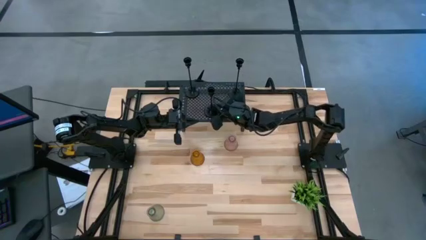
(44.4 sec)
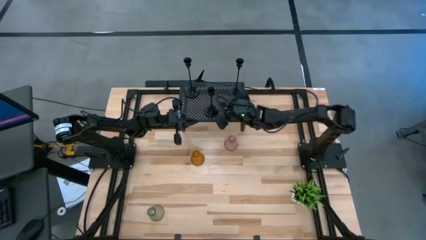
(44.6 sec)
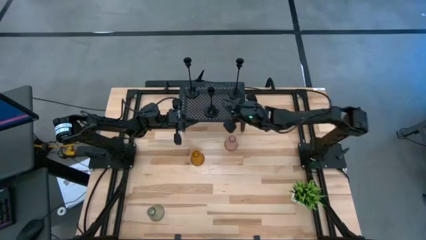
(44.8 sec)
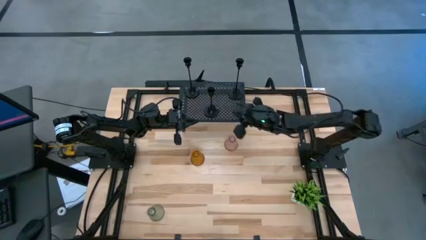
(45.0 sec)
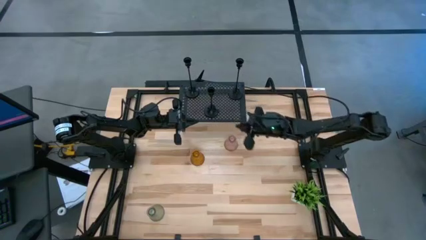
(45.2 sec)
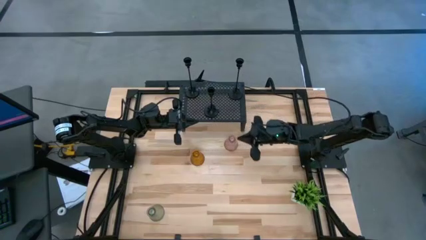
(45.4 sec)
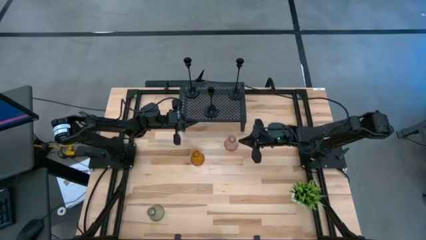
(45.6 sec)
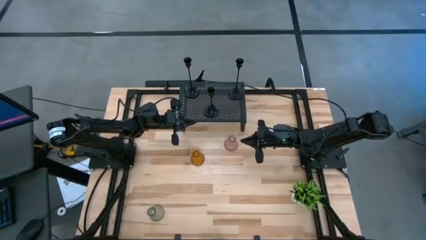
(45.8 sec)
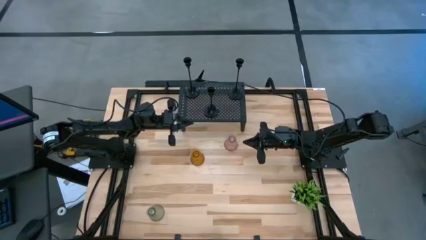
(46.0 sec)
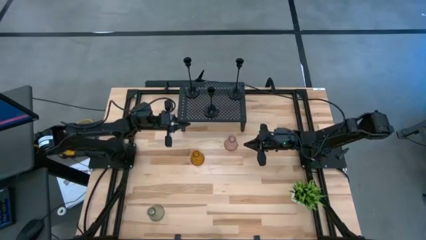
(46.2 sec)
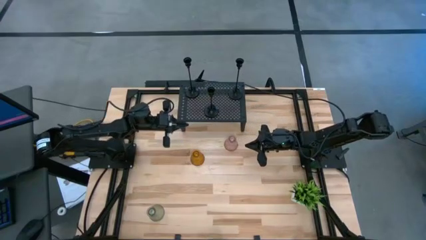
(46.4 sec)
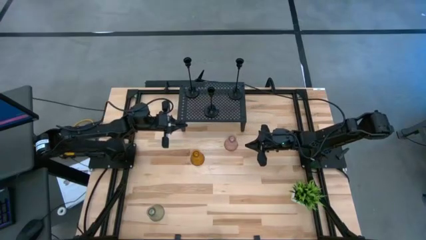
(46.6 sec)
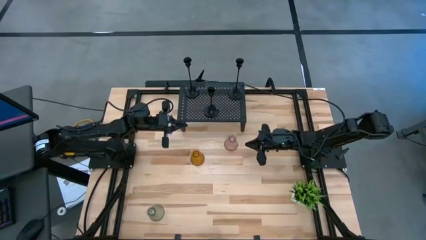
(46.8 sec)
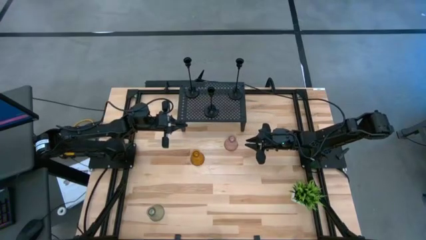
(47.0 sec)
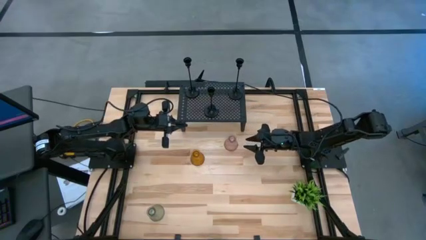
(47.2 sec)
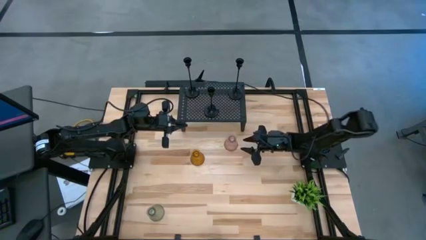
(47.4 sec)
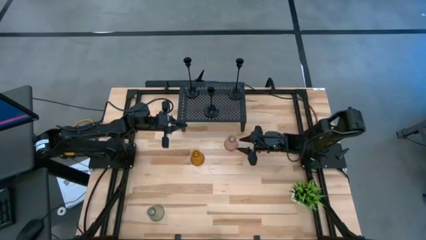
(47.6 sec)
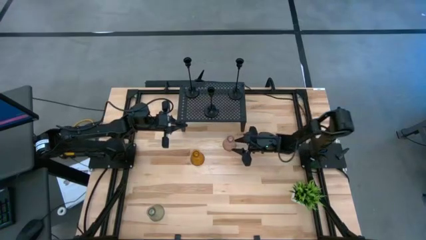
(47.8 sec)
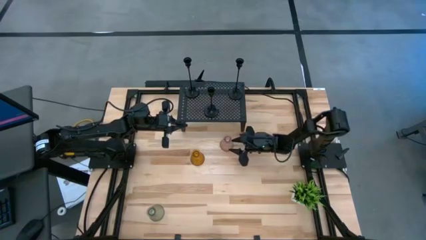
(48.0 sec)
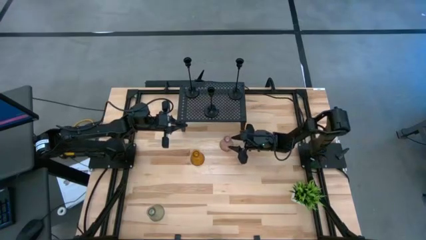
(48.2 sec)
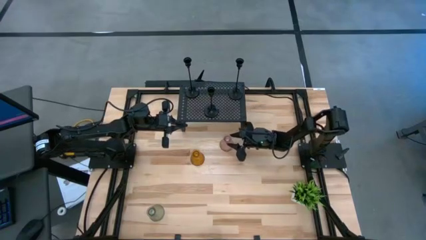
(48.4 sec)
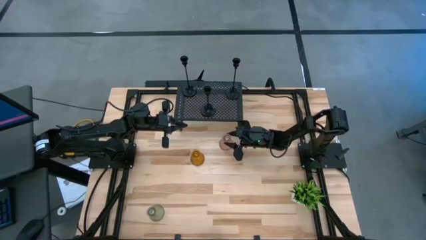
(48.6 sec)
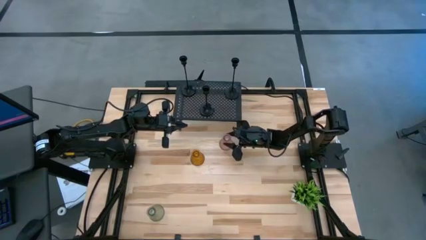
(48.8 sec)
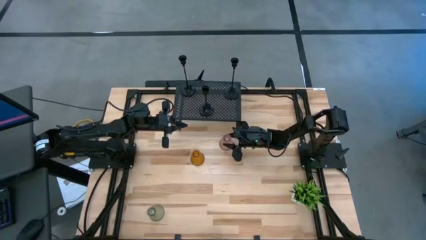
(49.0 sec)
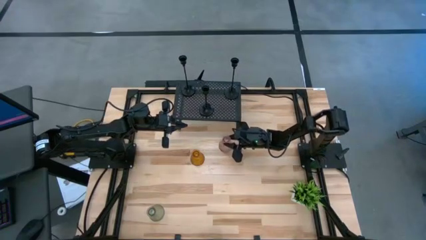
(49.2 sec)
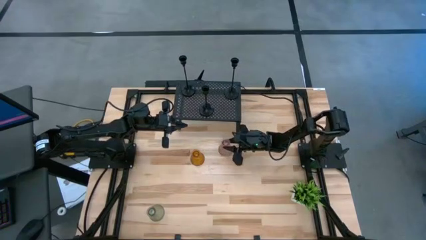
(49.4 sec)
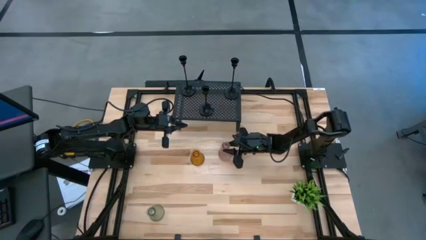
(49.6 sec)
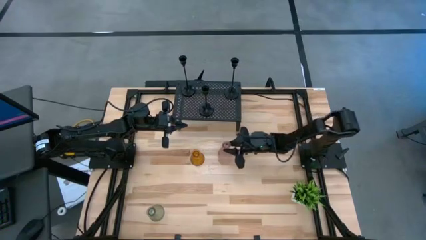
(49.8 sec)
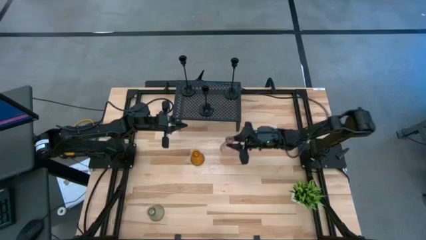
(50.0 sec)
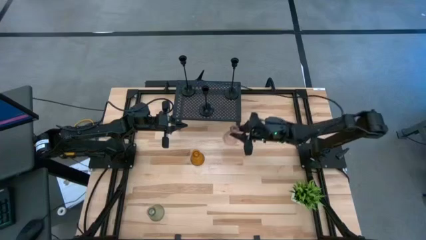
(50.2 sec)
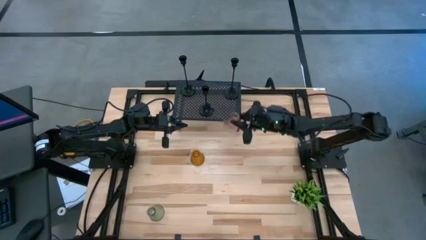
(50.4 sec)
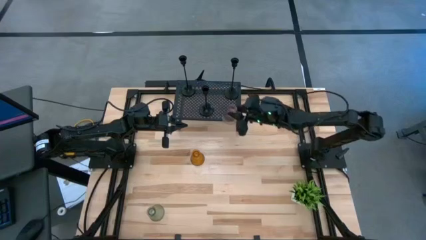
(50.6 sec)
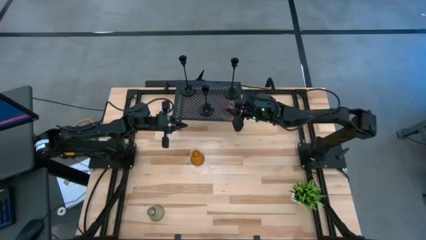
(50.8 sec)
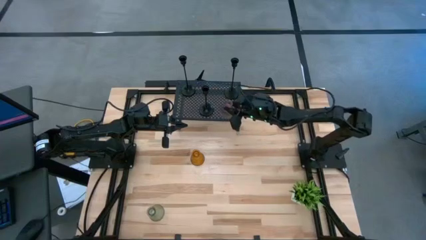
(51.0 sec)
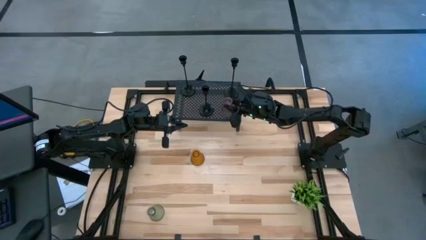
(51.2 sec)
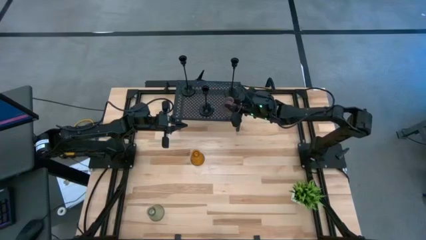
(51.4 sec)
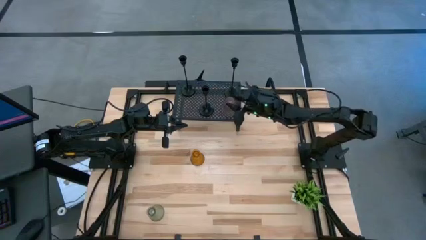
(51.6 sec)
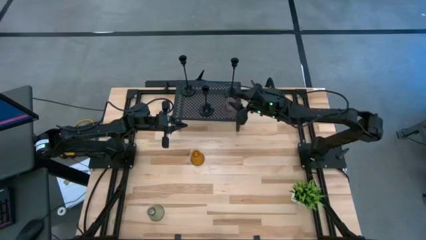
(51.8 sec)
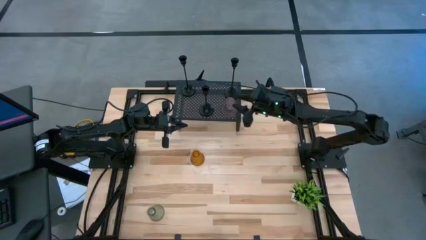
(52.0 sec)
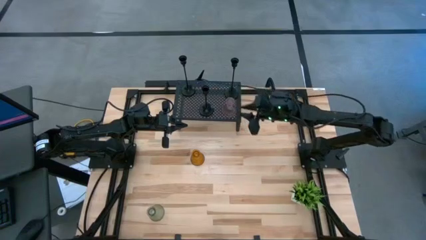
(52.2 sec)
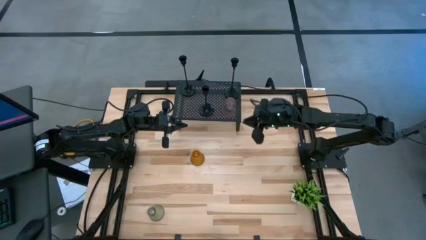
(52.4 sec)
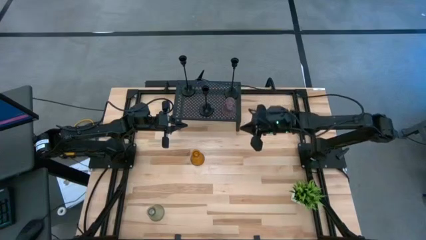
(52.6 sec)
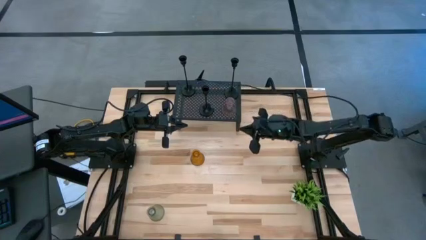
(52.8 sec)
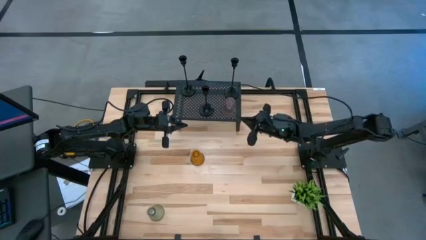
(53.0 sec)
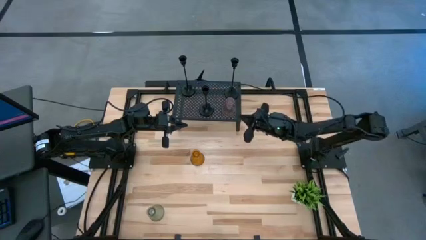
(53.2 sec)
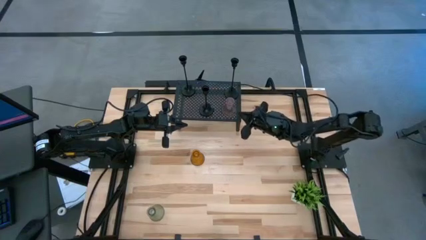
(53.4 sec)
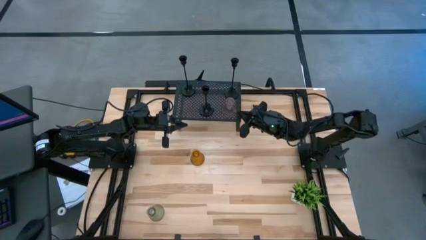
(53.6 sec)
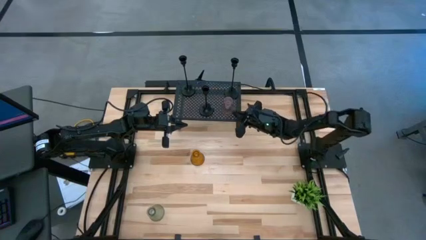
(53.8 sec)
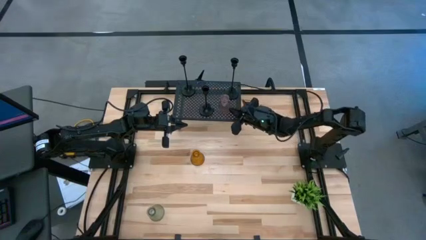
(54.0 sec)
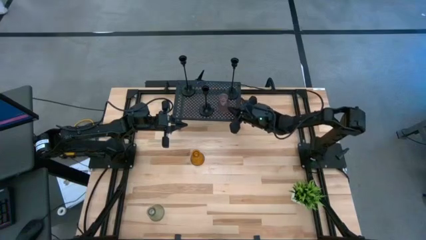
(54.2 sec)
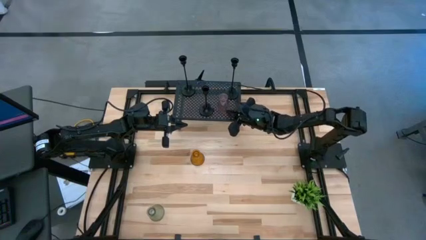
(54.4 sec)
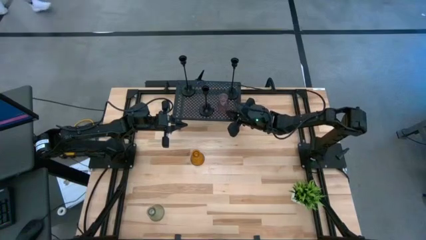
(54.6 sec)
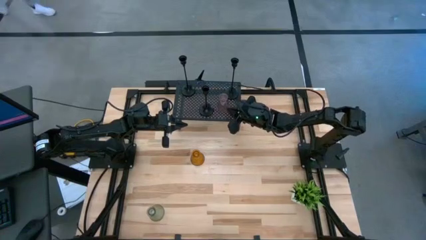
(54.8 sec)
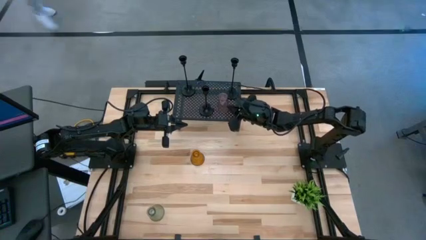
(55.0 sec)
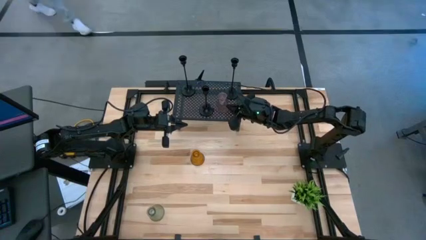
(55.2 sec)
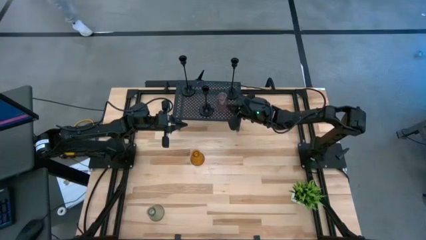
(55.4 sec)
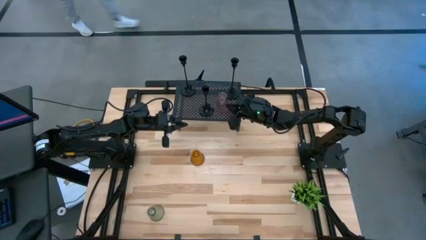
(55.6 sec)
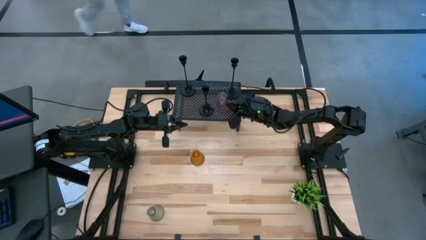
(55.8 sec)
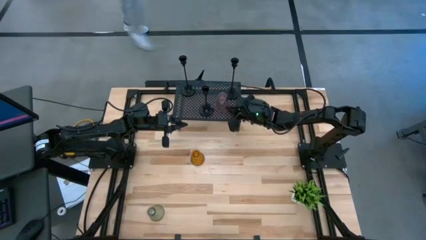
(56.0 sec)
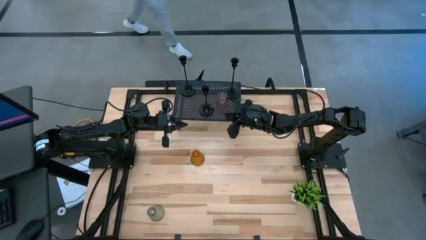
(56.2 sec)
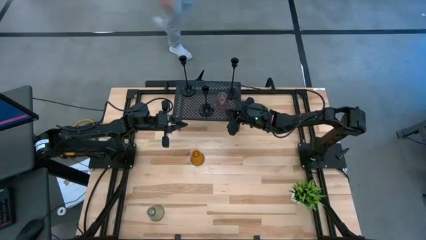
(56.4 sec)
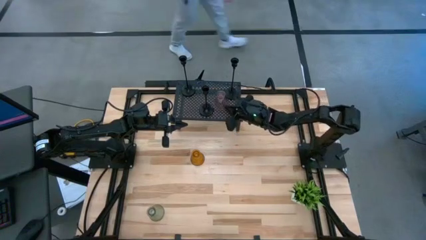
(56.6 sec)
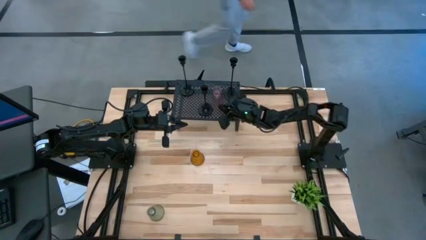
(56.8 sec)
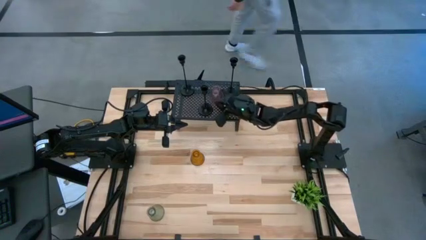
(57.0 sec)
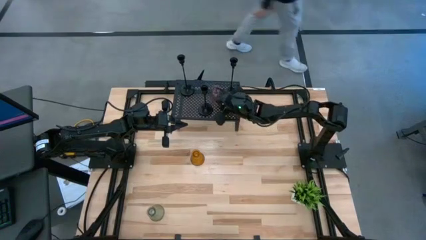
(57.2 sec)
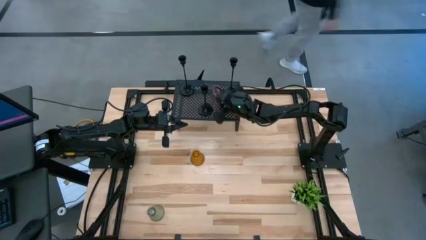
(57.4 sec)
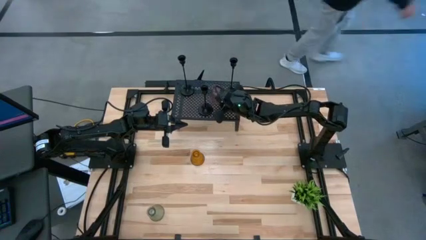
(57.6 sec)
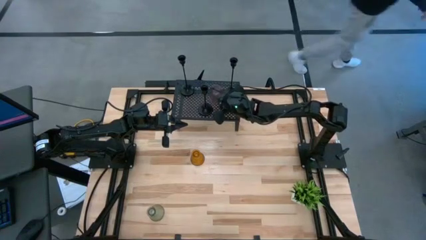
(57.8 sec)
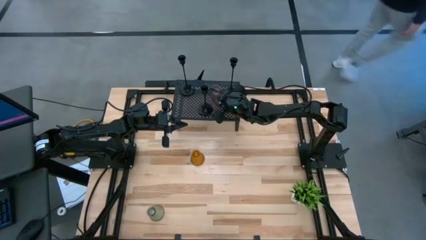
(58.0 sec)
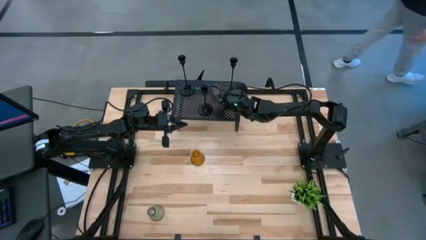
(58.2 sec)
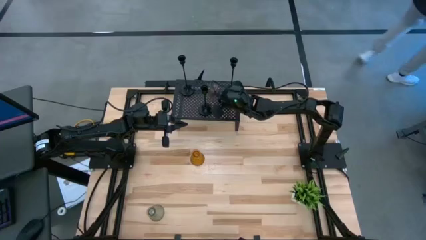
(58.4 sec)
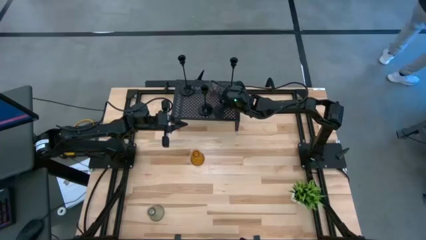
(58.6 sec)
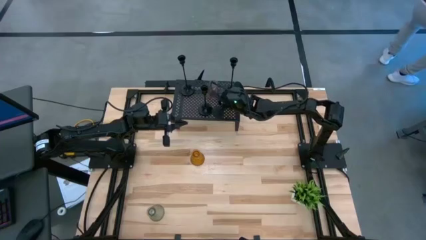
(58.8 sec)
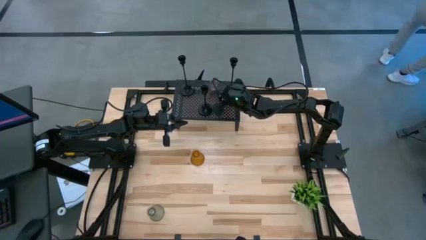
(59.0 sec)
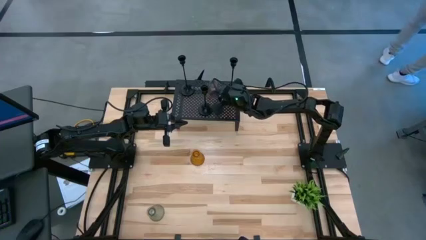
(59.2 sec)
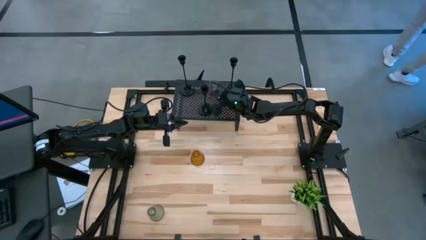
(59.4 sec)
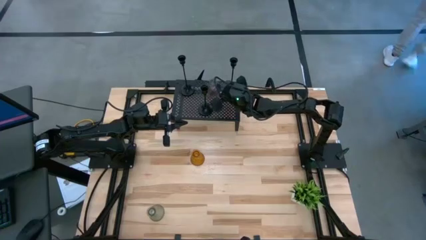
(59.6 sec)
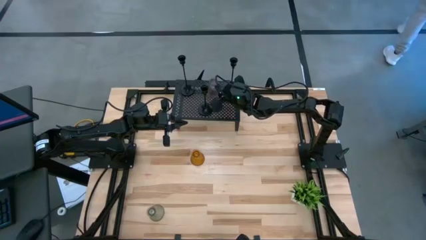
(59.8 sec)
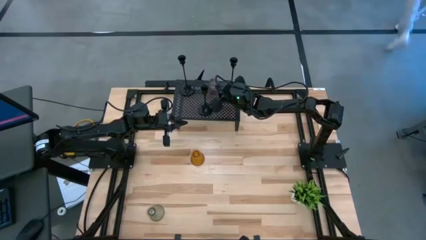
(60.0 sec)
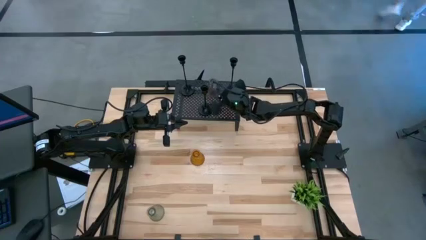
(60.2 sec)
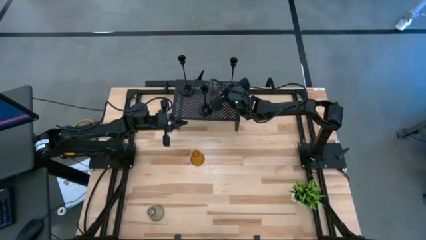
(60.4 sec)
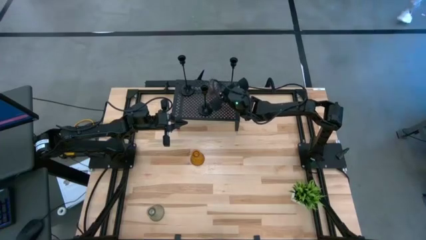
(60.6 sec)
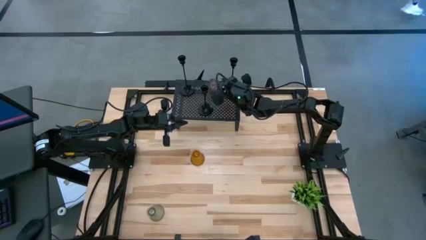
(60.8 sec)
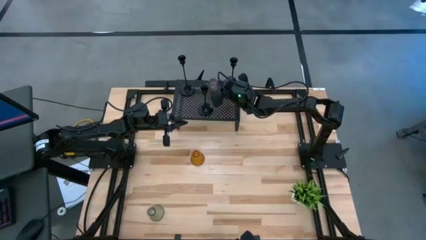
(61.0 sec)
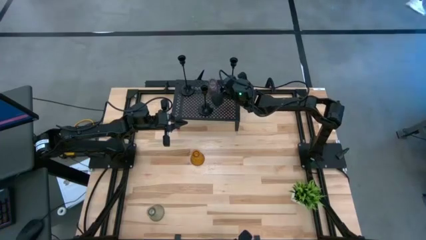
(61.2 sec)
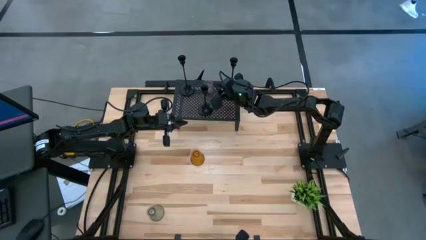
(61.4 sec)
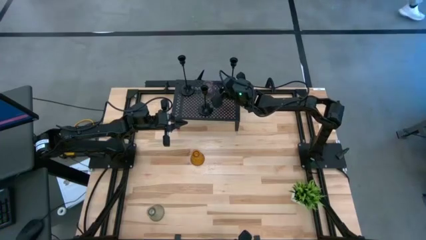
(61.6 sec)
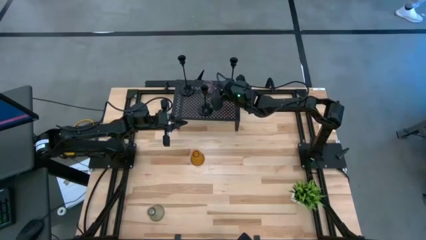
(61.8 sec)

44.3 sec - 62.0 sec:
Task: Pick & Place candle stick holders
Put the pink glass candle holder on the shelf
